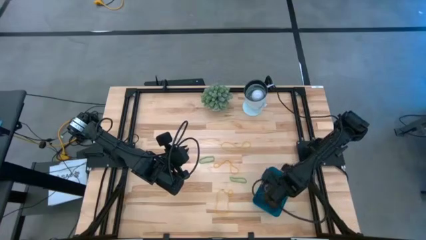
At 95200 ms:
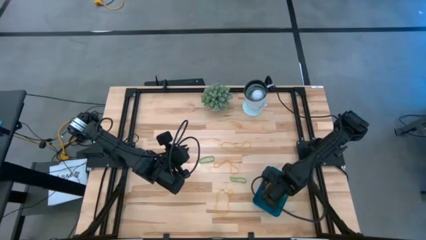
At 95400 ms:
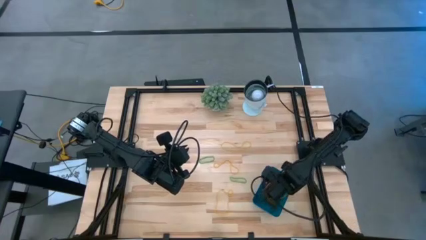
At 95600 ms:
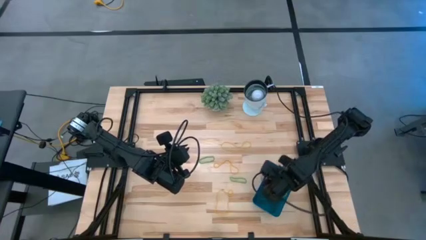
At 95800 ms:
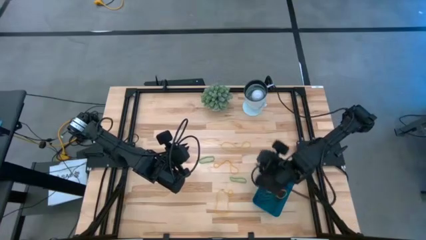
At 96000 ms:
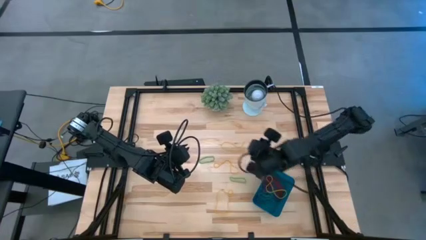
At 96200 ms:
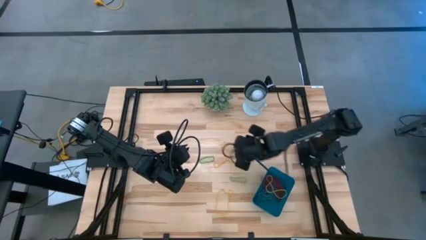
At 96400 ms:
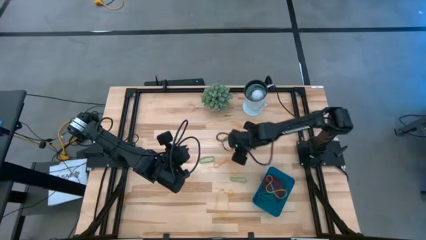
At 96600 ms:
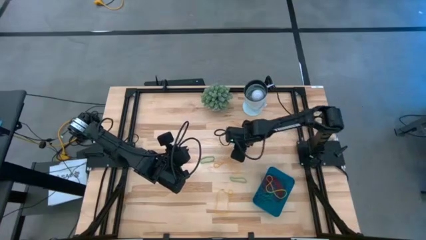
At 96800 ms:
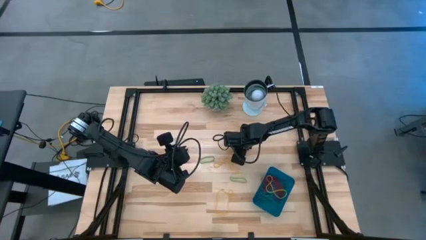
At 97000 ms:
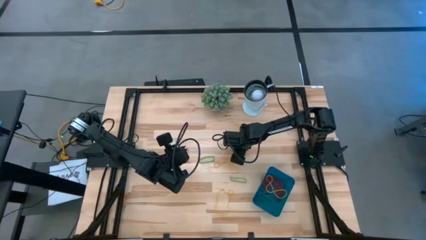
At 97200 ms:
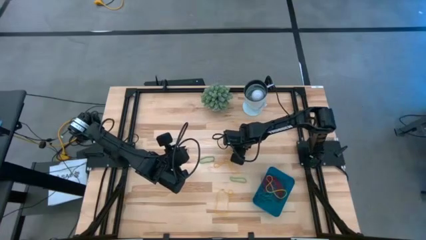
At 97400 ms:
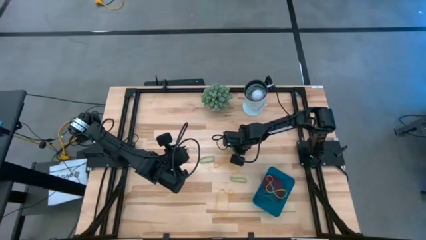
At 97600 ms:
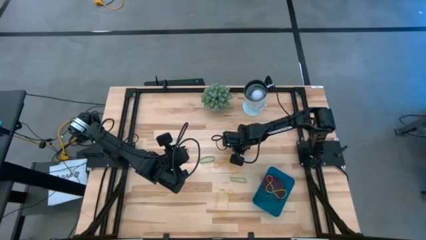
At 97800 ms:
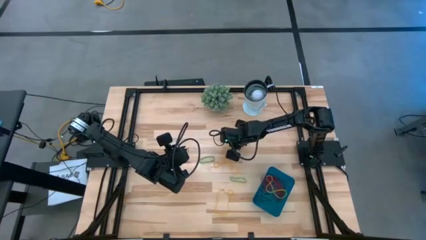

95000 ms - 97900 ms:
Task: Pick and place items into bin
Put the yellow rubber band into the blue bin

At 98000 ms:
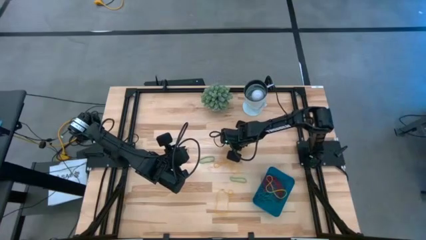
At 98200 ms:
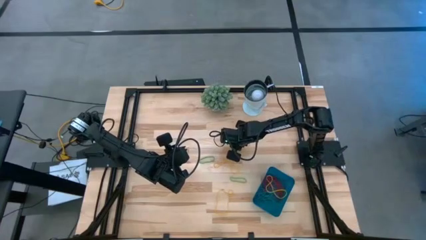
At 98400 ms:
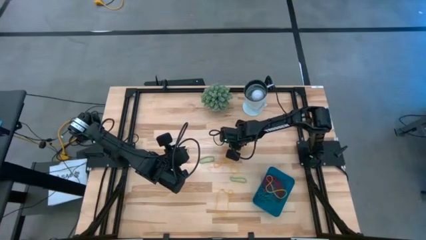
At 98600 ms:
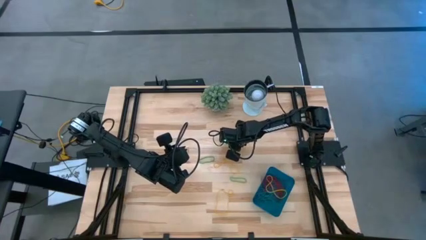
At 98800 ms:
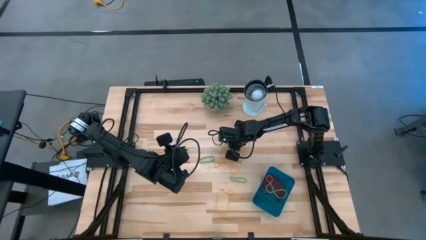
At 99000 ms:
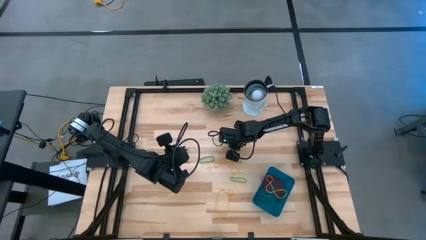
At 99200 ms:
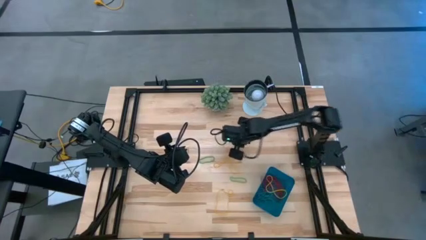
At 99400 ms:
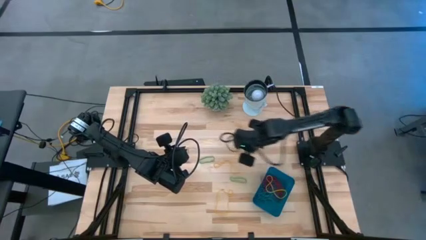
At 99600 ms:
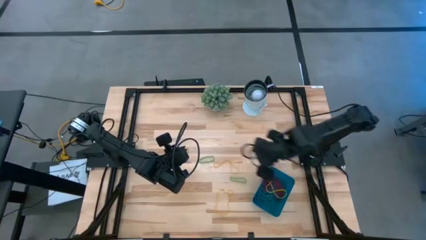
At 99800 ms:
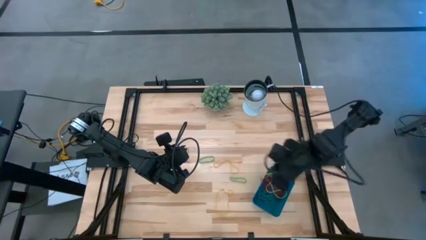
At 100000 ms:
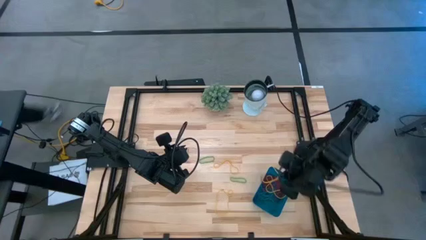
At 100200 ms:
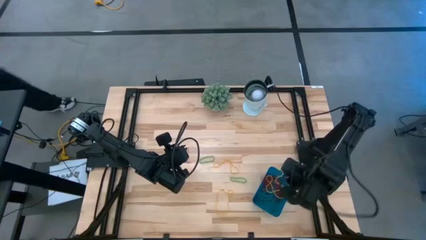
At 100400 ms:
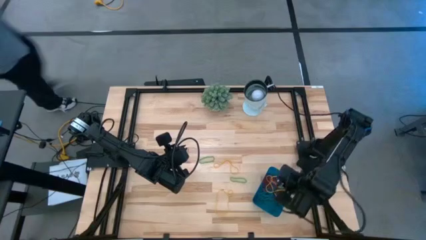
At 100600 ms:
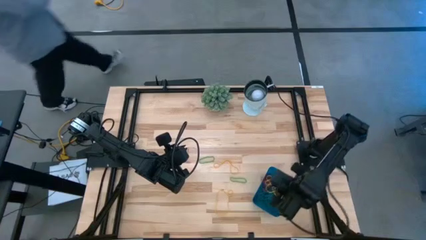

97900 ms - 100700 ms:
Put the yellow rubber band into the blue bin

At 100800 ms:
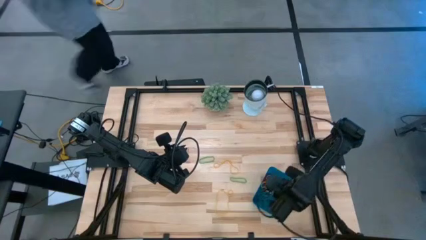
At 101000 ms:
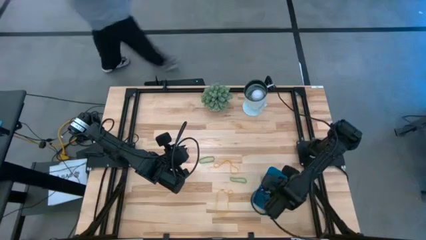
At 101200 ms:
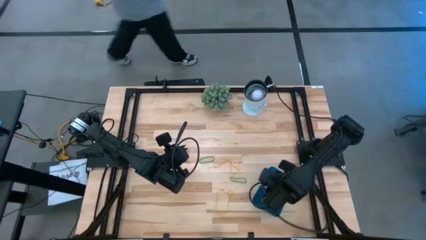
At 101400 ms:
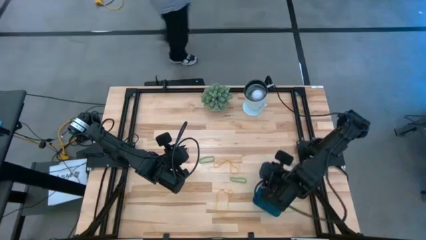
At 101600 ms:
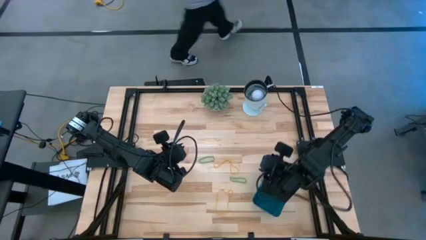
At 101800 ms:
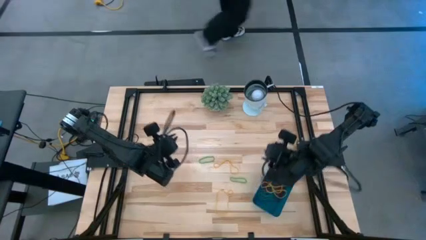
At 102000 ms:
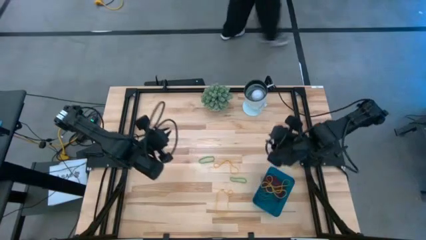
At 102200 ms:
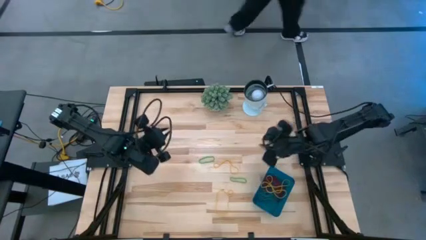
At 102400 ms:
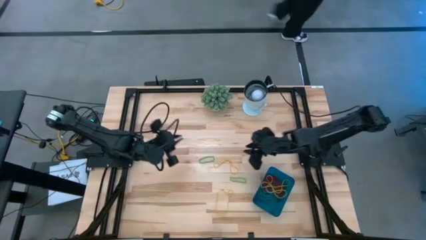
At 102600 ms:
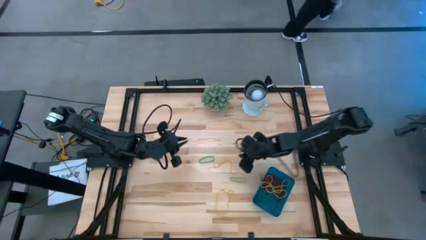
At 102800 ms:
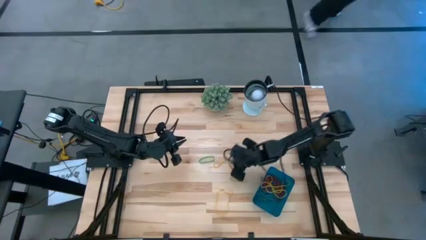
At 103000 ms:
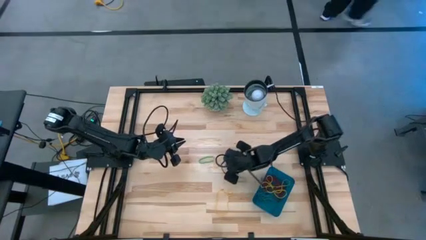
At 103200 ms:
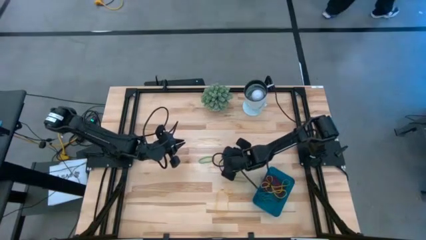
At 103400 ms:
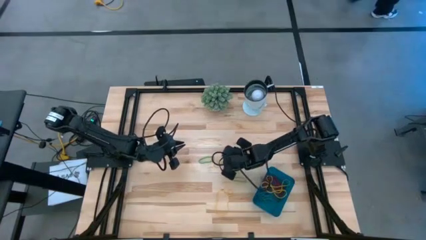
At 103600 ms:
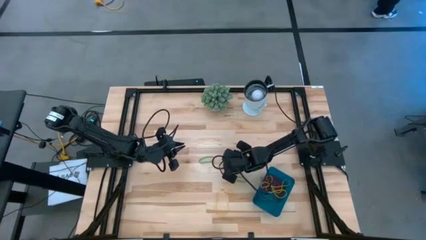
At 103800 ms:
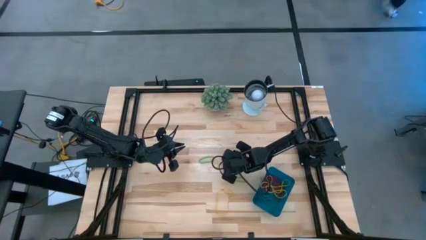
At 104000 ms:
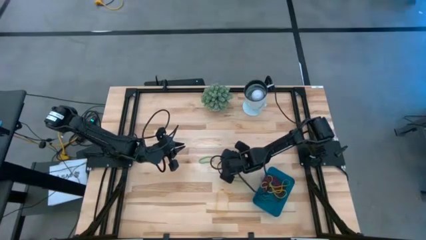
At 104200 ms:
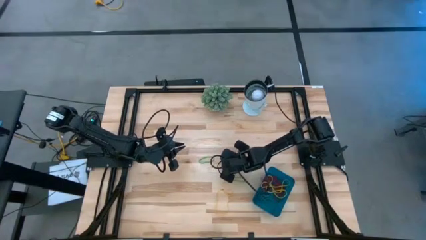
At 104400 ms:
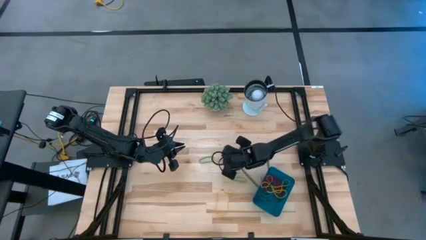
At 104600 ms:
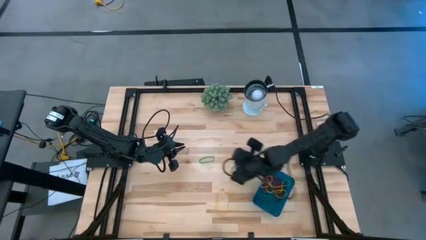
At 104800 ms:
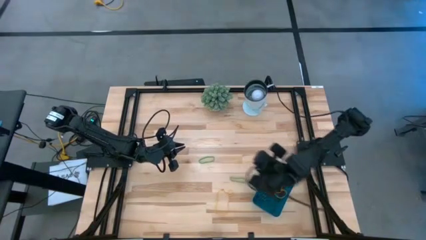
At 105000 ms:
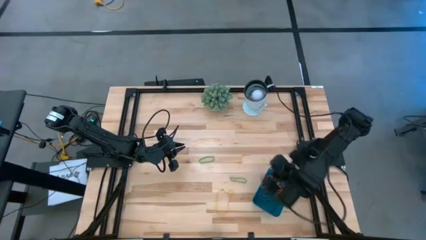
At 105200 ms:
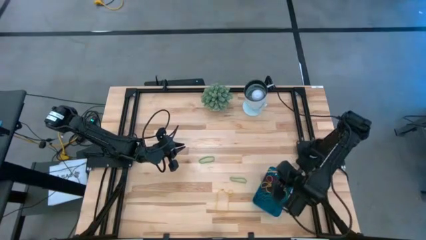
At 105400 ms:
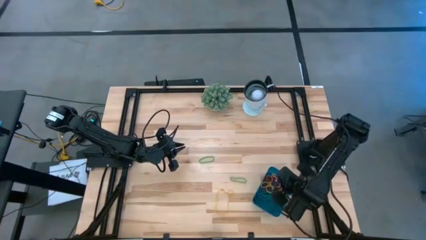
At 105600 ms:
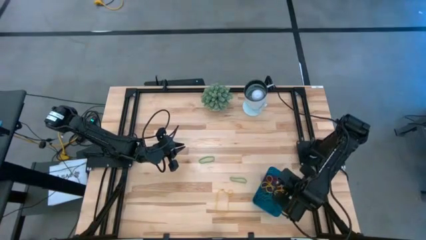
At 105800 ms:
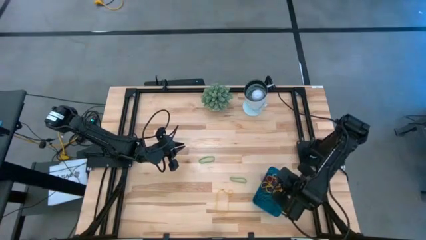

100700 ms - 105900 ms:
Put the yellow rubber band into the blue bin

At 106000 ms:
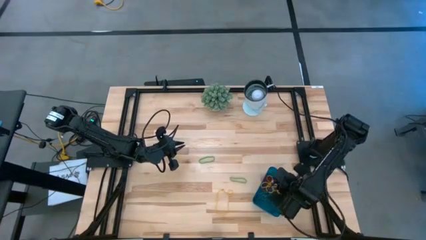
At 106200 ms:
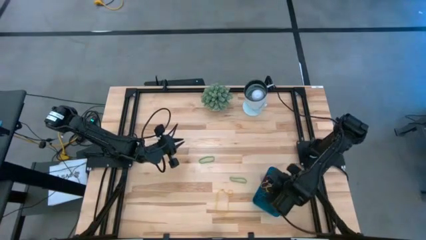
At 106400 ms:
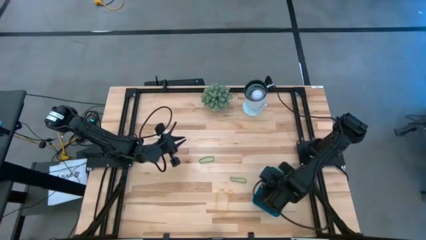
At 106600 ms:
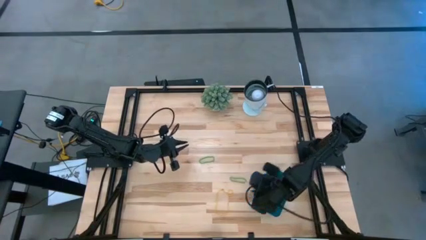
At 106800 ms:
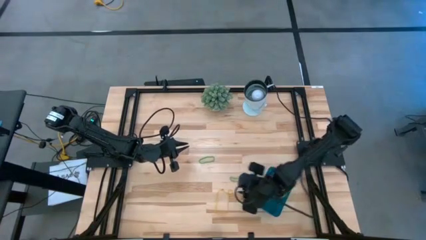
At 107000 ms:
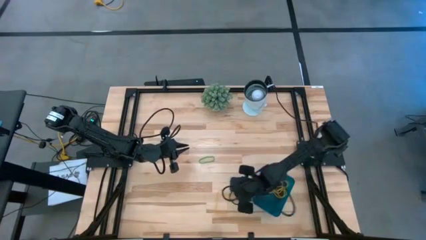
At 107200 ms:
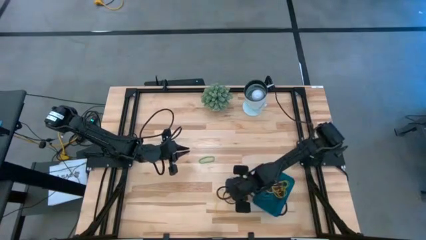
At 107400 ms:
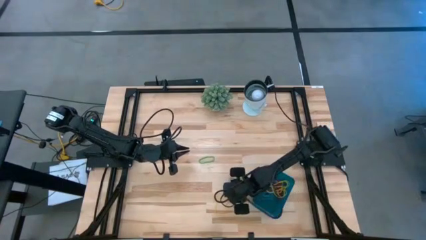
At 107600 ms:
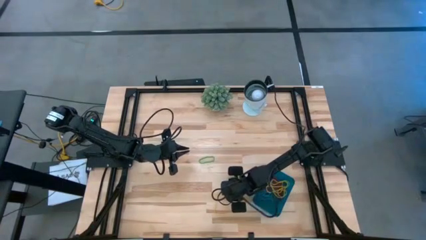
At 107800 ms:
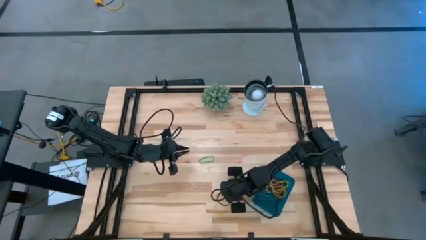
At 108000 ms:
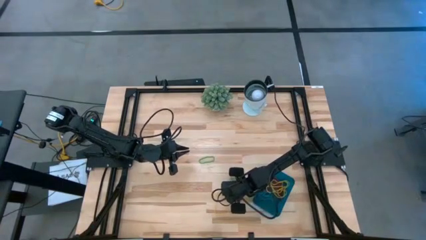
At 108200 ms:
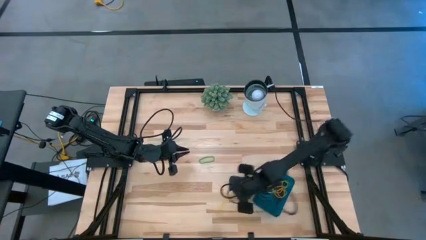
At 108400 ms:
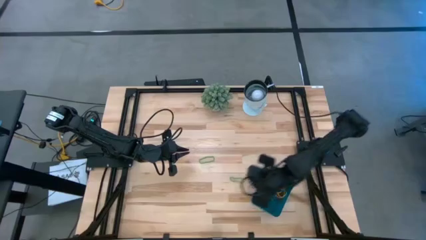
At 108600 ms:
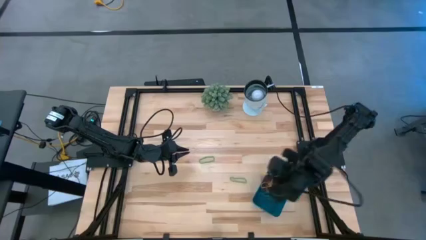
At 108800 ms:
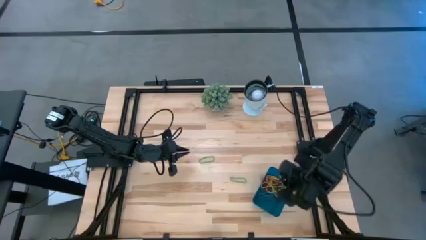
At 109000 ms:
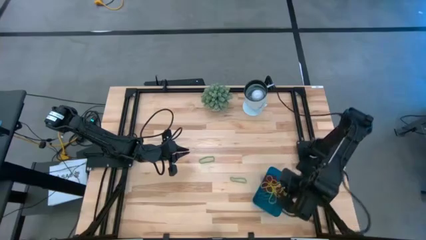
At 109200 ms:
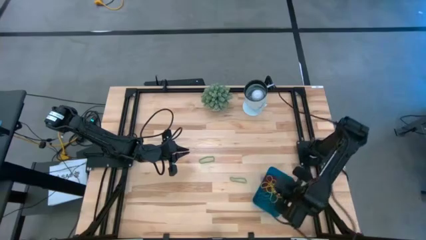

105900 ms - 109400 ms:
Put the yellow rubber band into the blue bin

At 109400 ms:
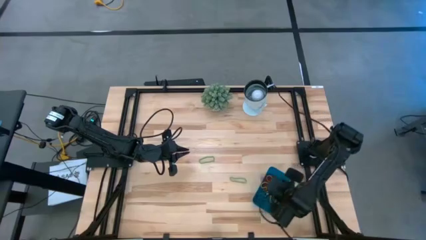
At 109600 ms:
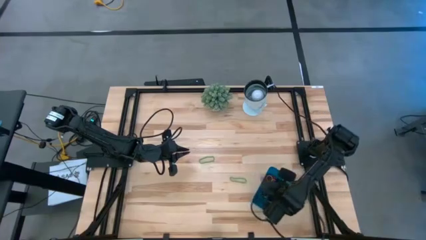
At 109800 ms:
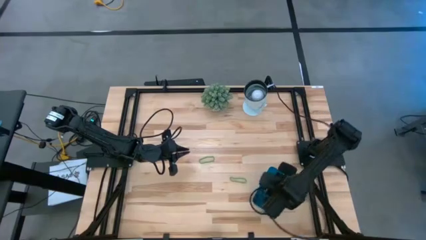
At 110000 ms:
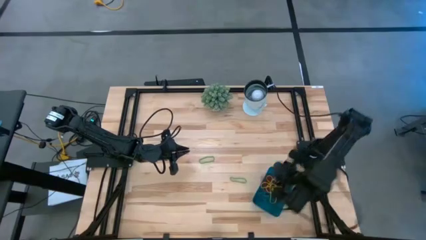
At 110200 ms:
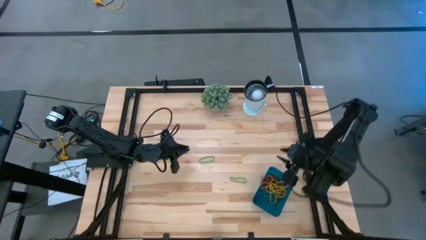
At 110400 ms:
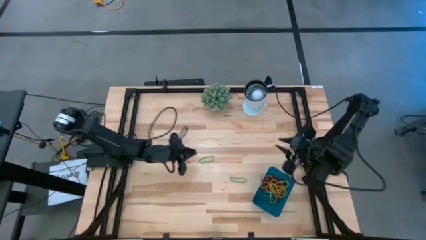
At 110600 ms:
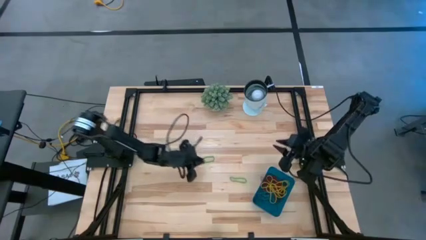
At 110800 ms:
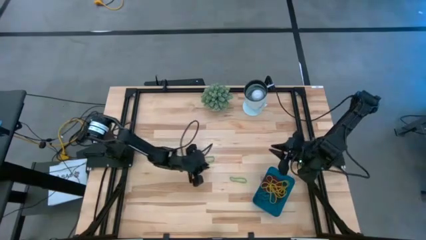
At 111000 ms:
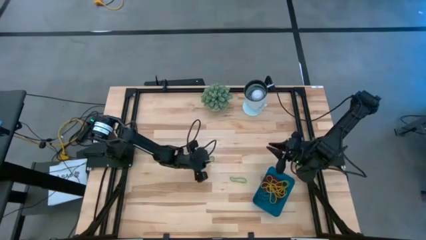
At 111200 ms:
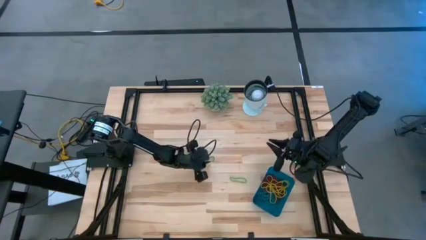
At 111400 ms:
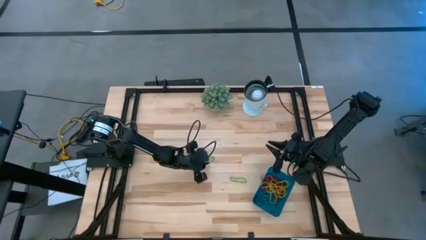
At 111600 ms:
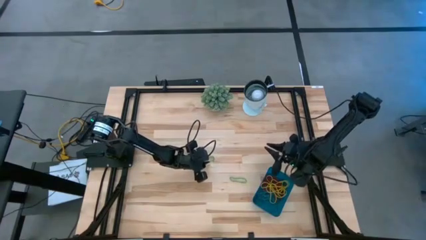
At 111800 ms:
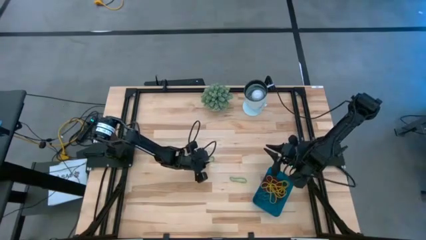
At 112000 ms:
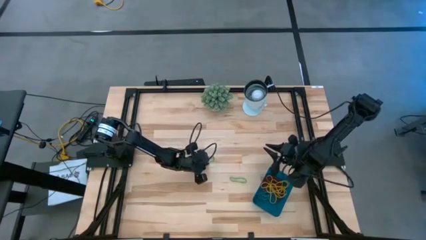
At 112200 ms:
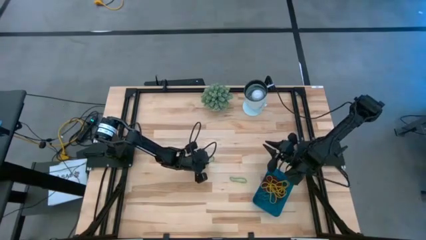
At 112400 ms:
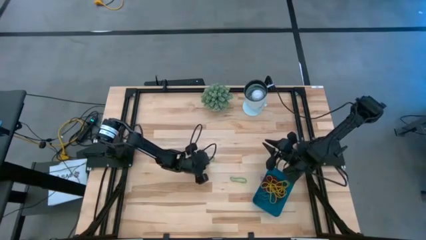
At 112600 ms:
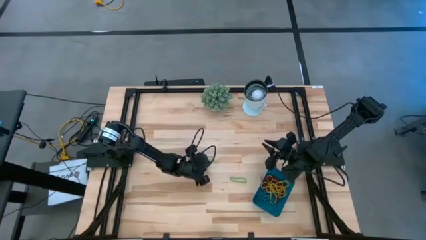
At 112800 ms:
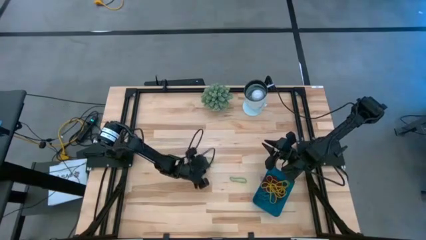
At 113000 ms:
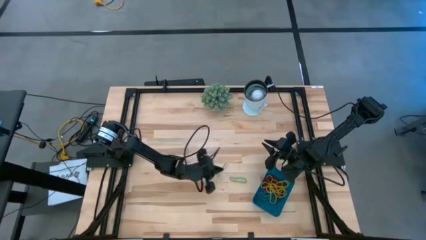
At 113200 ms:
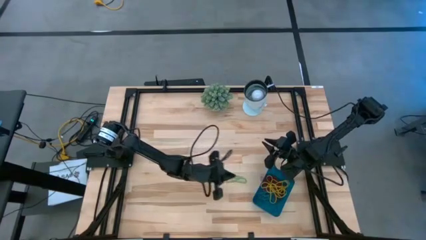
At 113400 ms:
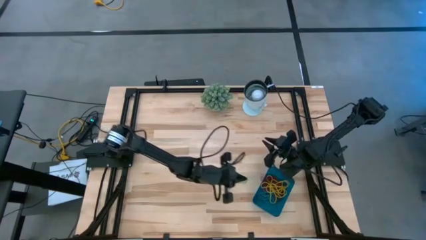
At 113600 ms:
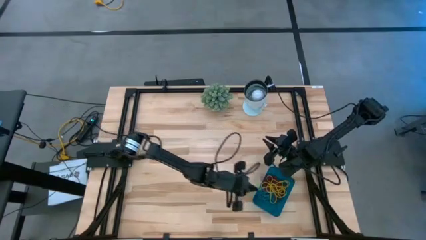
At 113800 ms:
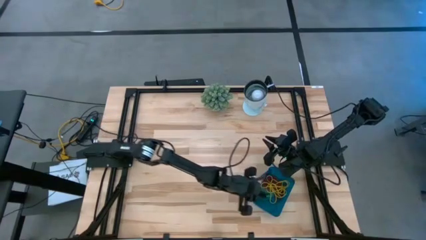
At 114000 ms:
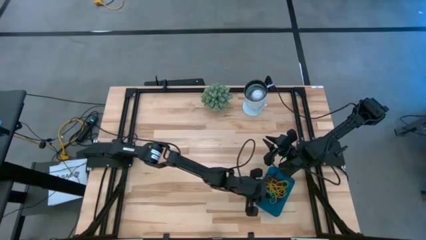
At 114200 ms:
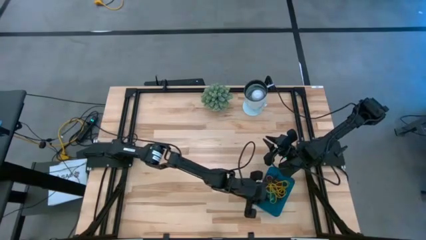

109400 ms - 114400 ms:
Put the green rubber band into the blue bin
